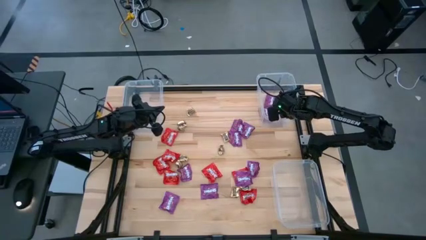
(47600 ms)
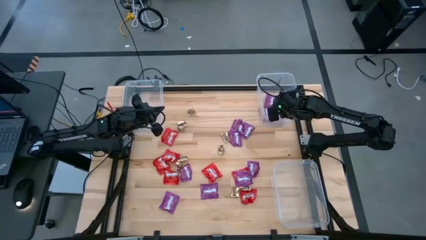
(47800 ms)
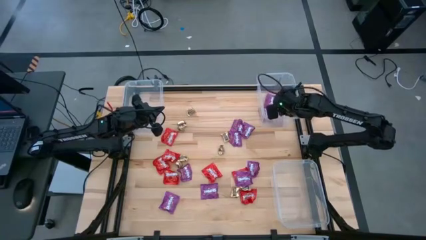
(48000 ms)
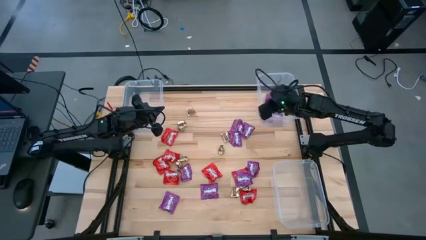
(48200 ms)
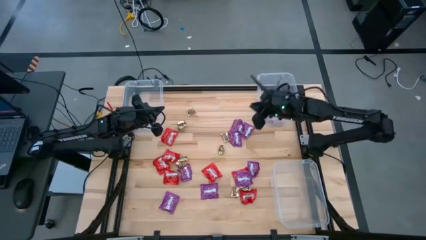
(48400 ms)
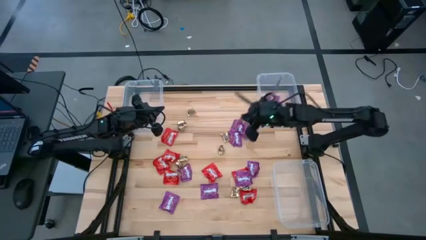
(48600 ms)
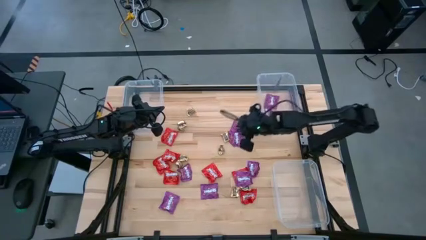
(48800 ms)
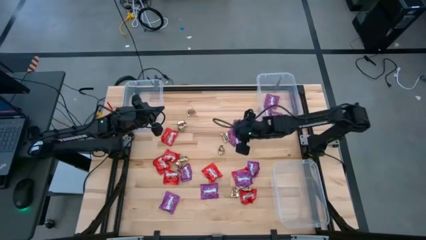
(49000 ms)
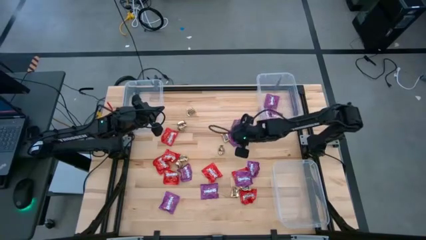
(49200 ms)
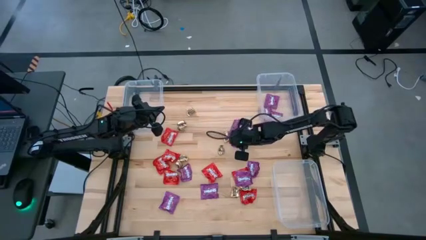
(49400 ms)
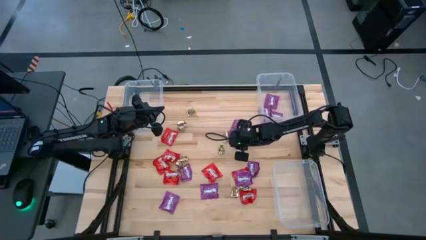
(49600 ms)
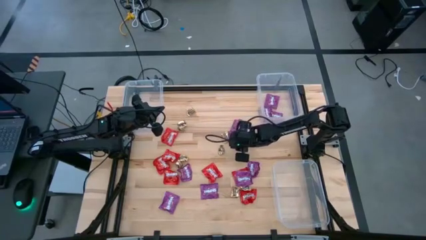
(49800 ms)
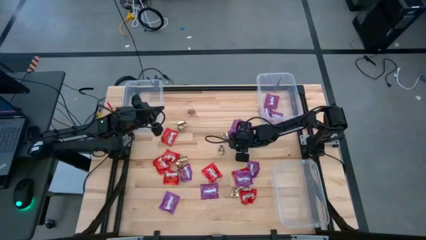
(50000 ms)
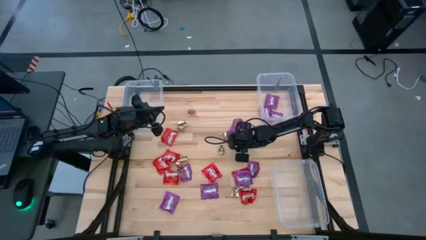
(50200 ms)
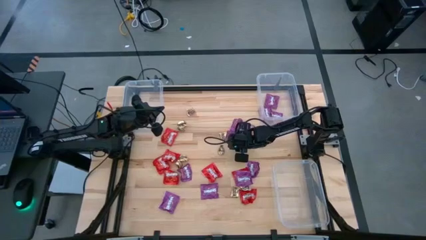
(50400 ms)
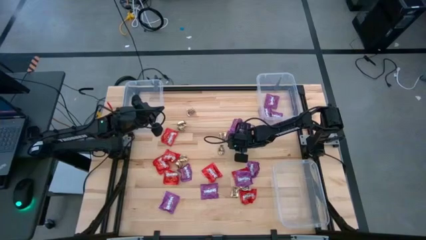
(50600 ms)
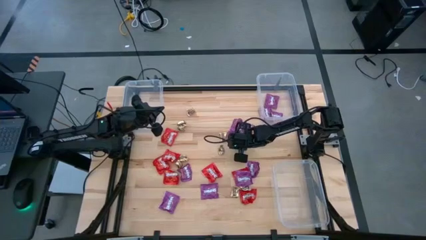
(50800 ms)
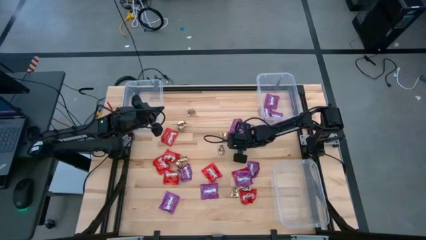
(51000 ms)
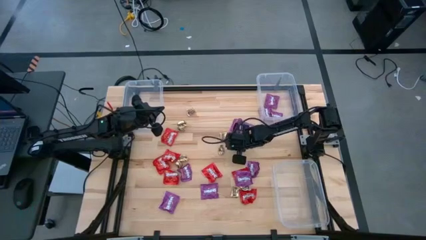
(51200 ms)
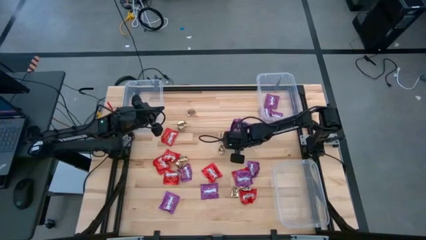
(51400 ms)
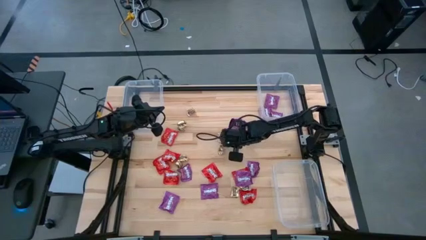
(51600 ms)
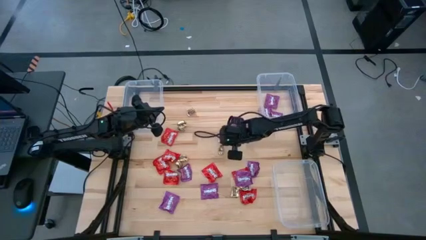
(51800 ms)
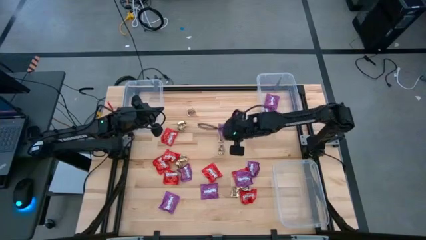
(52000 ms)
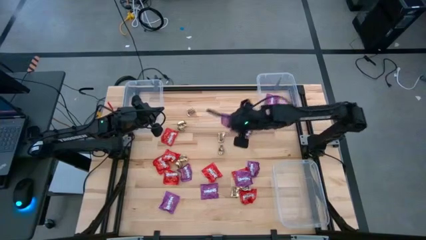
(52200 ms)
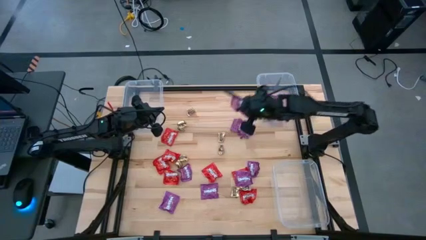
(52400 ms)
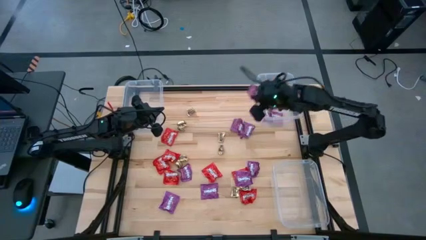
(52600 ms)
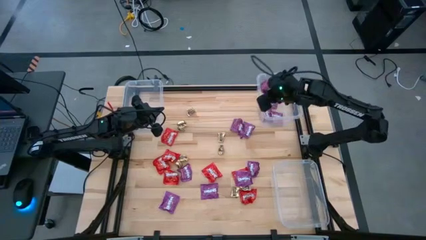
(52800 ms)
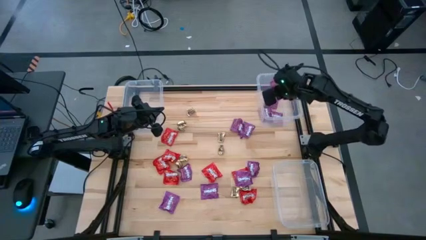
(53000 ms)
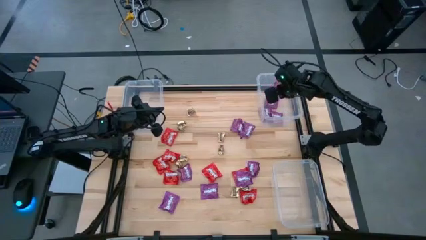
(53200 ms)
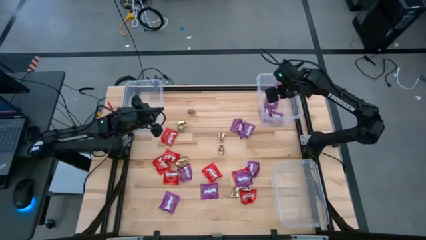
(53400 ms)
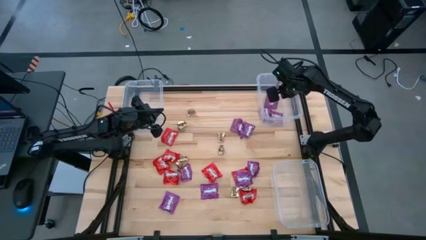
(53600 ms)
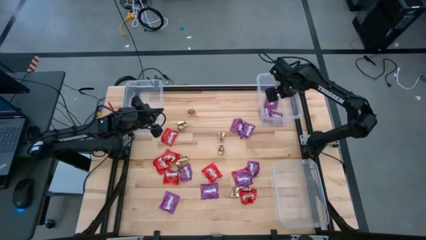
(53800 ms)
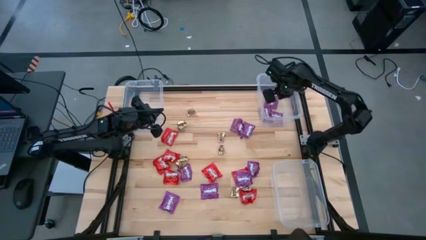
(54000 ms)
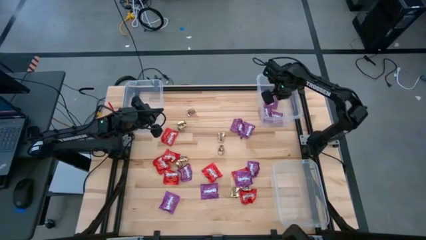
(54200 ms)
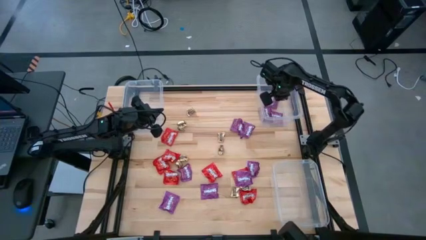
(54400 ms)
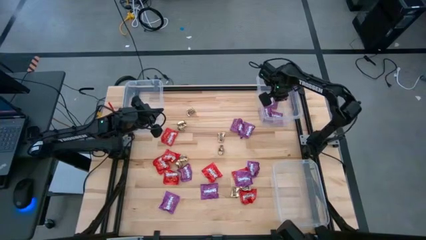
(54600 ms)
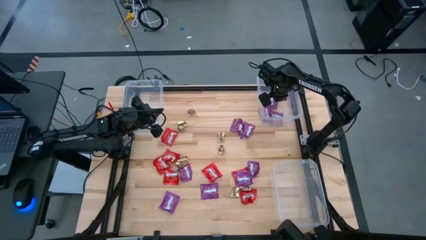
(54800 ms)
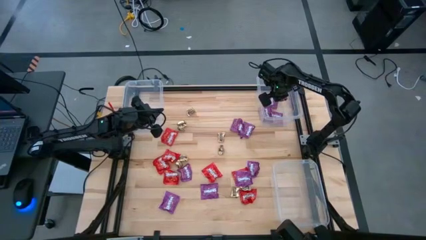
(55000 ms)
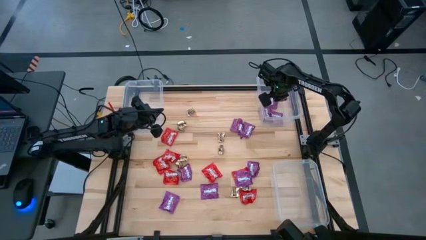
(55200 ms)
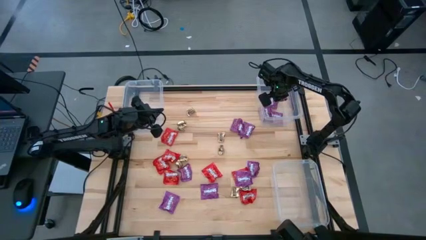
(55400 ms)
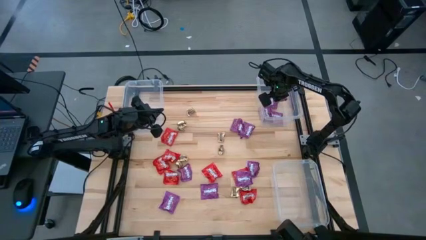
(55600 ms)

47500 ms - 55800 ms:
Task: Sort candy
Put the purple candy into the top right transparent bin

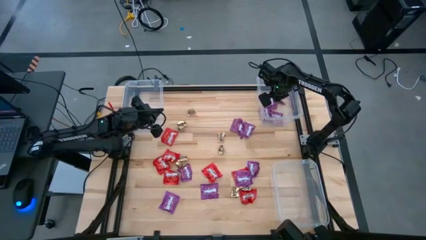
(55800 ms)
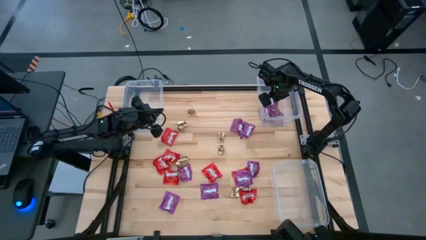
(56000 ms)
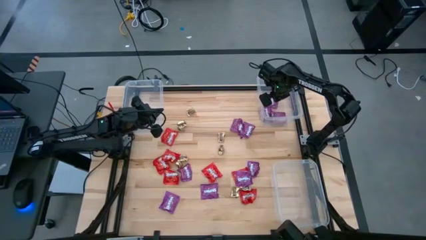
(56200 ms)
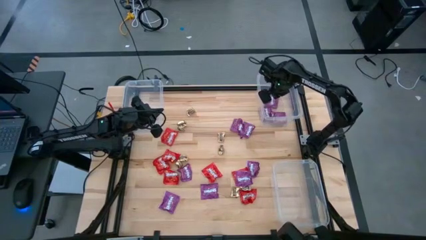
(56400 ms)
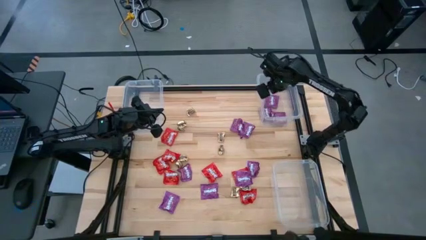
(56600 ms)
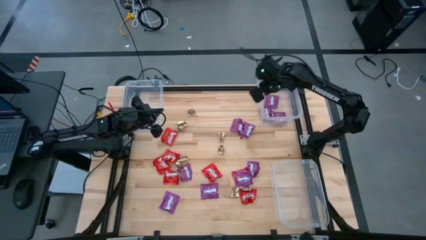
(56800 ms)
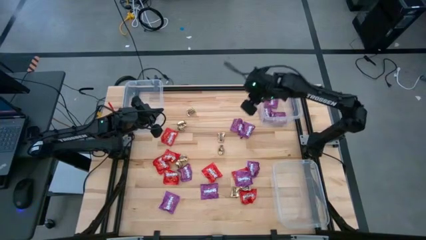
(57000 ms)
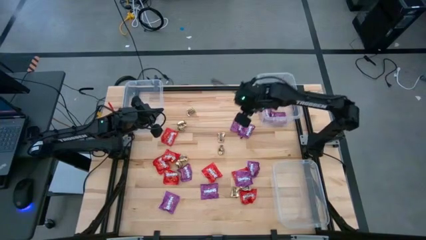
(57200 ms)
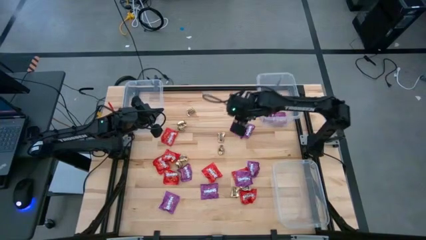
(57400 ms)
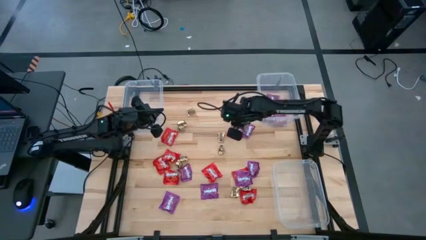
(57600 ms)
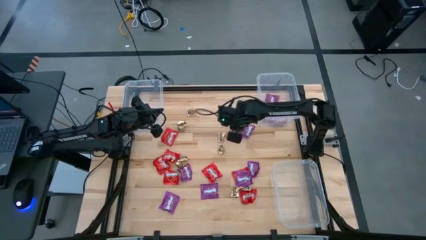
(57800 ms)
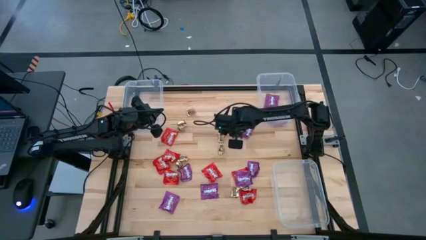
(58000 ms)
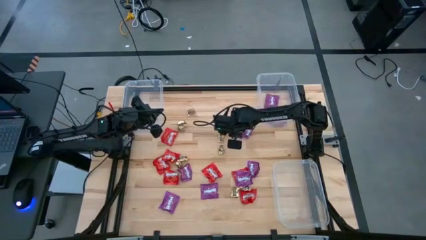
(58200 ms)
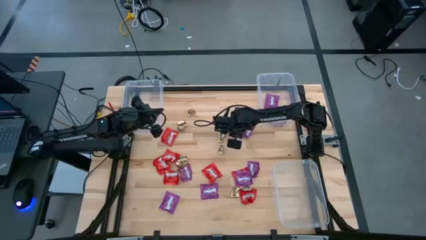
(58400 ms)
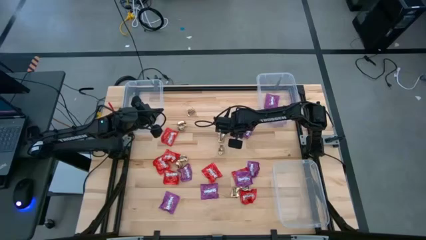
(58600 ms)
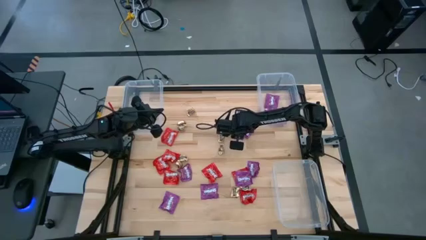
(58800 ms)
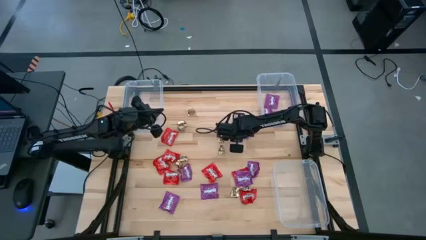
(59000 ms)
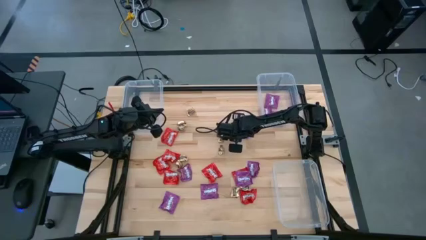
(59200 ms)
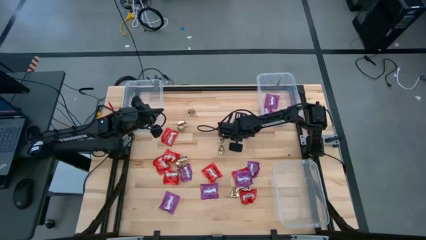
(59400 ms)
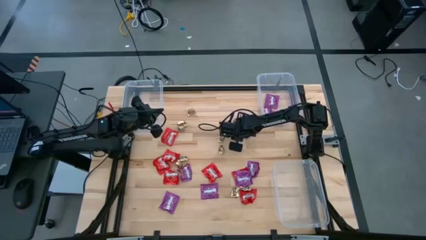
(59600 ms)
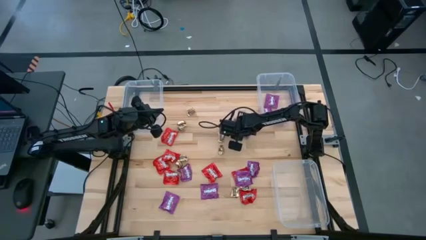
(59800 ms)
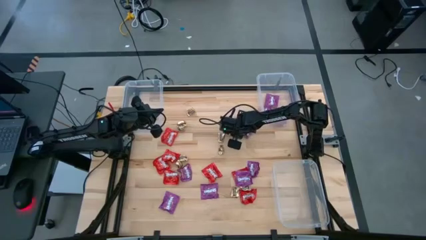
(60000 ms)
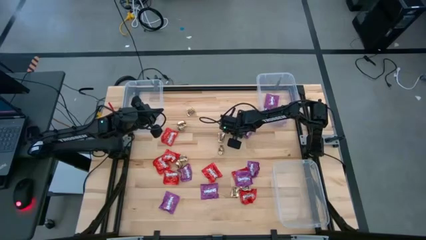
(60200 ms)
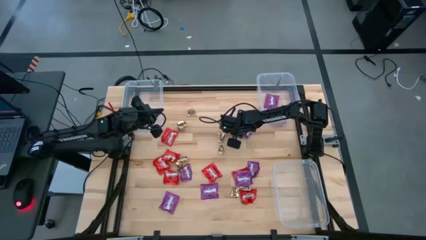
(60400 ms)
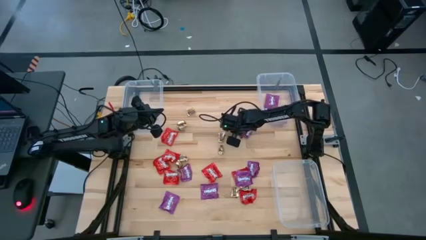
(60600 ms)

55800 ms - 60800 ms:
Put the purple candy into the top right transparent bin

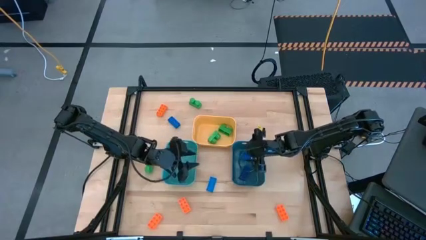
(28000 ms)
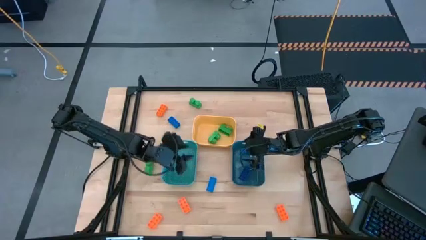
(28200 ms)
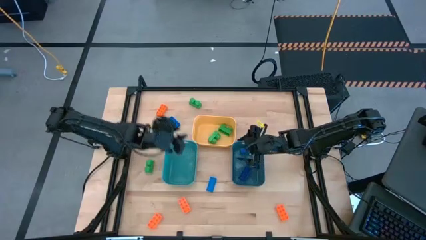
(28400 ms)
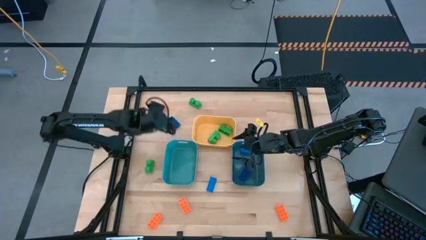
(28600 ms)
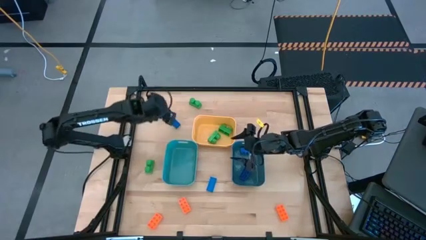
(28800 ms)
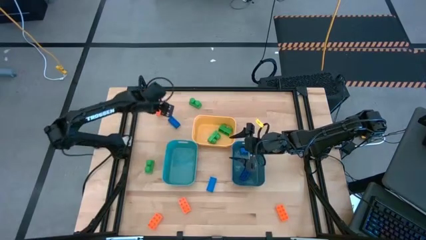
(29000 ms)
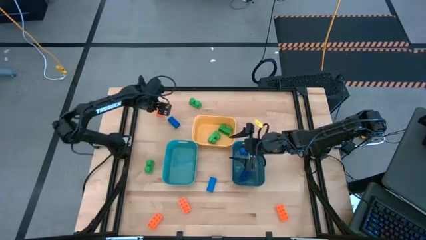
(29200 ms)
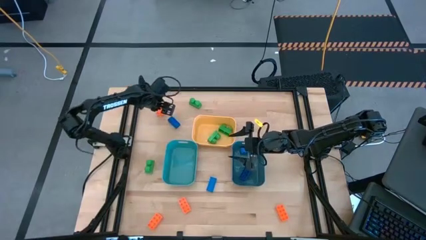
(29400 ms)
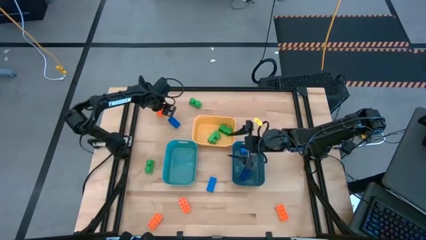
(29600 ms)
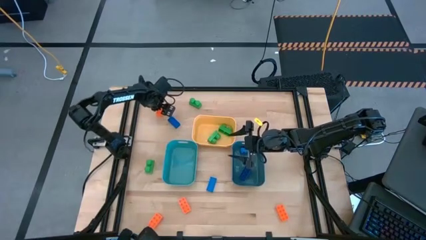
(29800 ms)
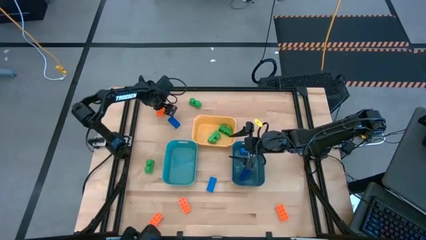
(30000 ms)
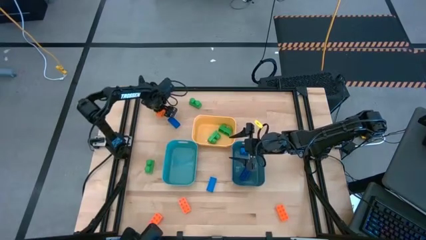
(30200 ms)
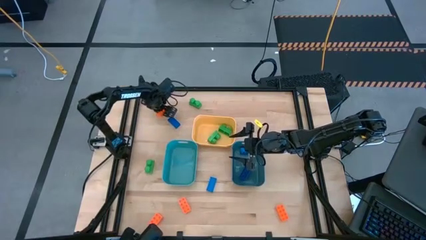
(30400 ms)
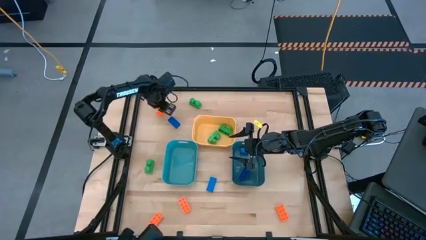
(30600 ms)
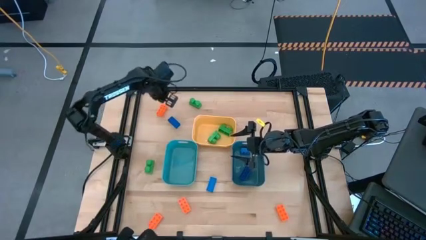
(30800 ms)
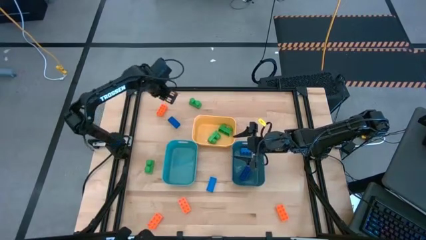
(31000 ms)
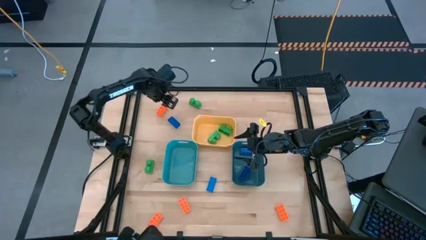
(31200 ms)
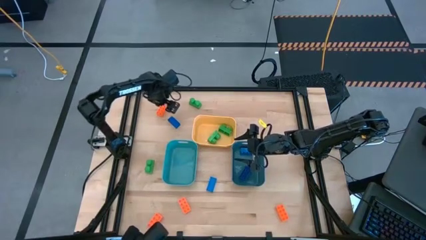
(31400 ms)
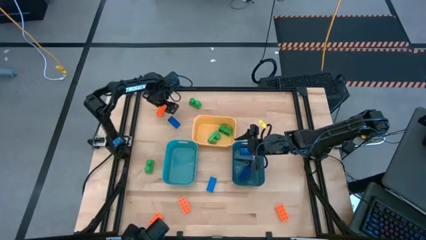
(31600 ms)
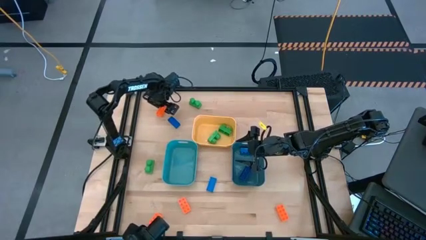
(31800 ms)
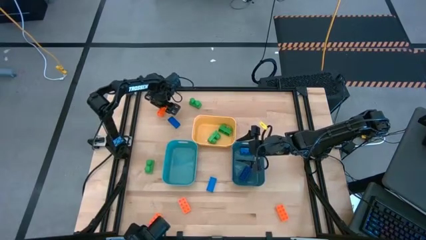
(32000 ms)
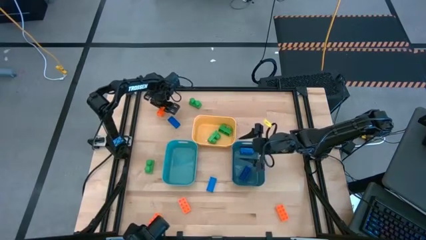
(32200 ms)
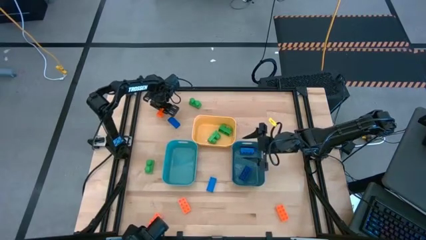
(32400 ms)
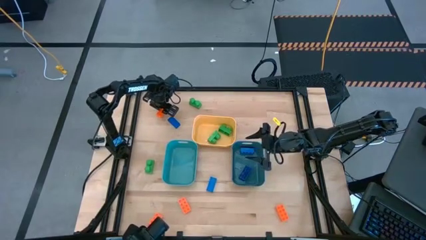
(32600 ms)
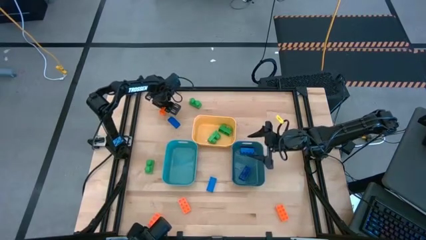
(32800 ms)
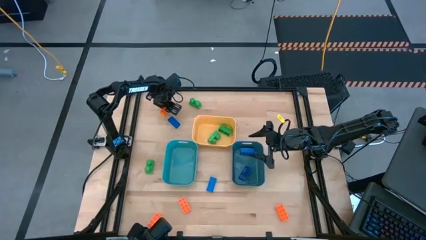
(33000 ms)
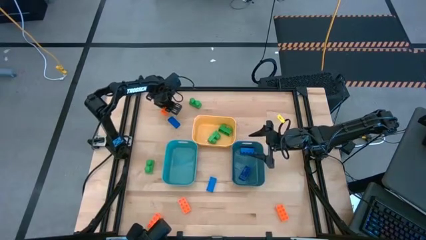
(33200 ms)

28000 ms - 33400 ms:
Task: Sort & place blocks by color
Put the orange game piece into the light blue bin
